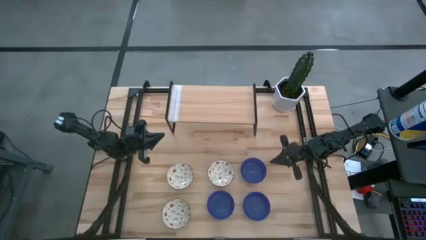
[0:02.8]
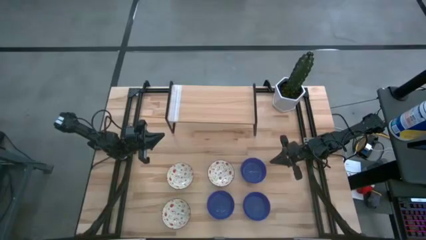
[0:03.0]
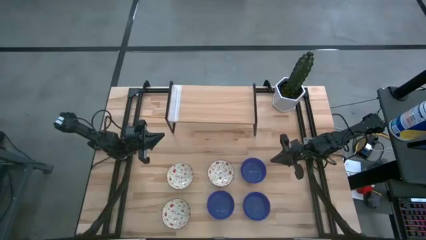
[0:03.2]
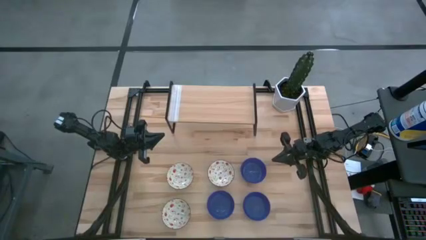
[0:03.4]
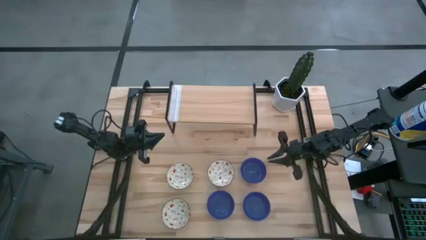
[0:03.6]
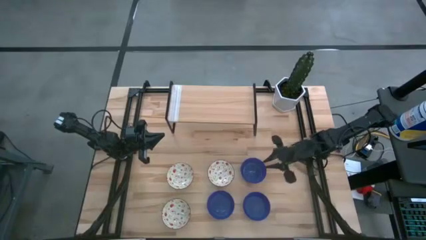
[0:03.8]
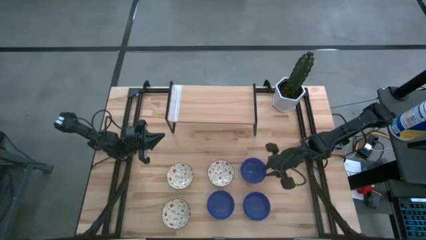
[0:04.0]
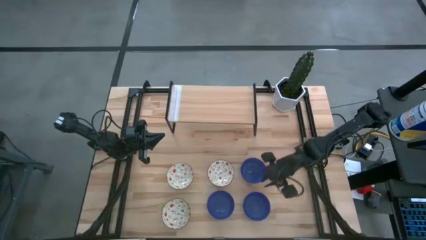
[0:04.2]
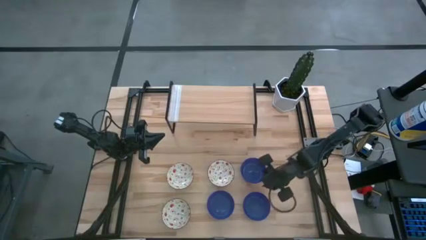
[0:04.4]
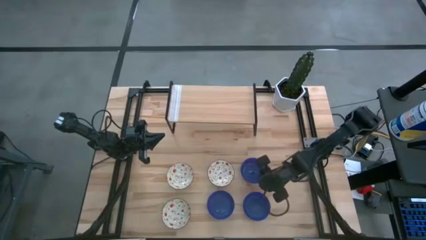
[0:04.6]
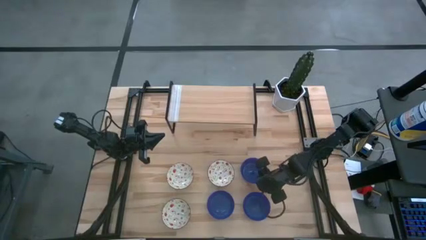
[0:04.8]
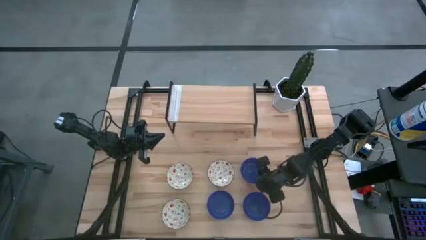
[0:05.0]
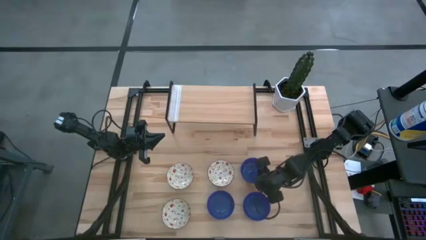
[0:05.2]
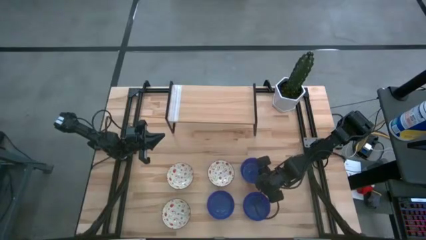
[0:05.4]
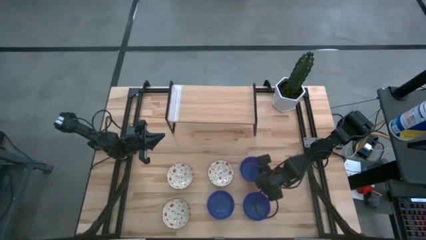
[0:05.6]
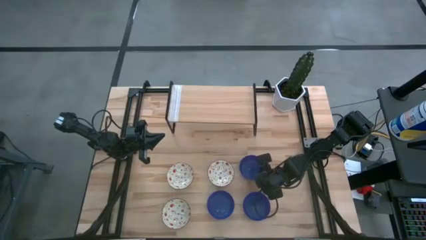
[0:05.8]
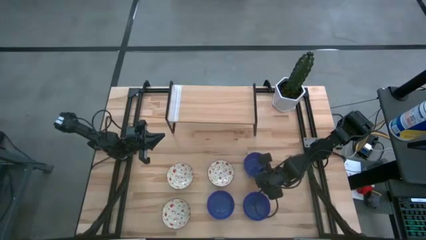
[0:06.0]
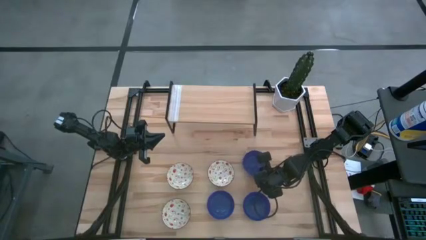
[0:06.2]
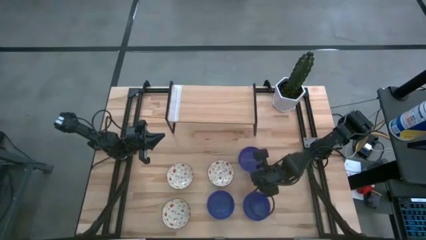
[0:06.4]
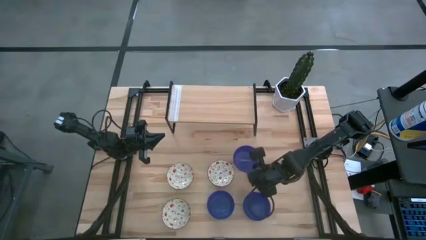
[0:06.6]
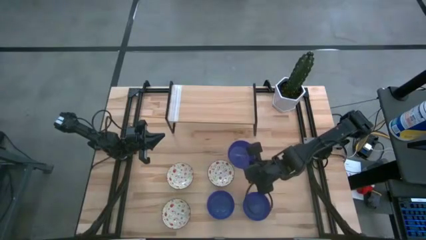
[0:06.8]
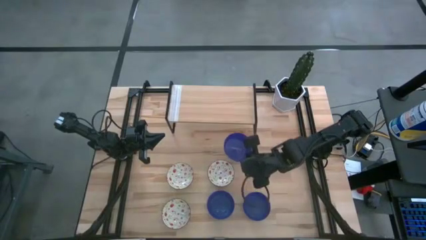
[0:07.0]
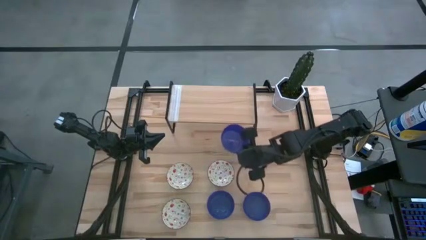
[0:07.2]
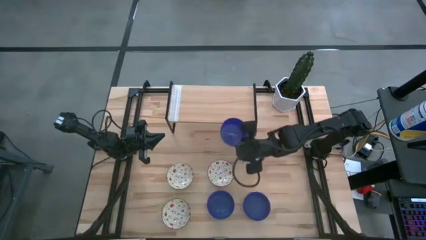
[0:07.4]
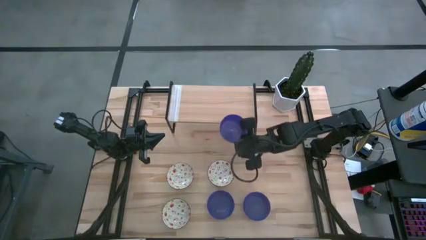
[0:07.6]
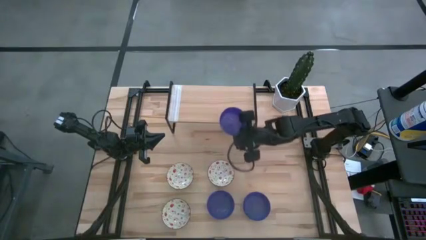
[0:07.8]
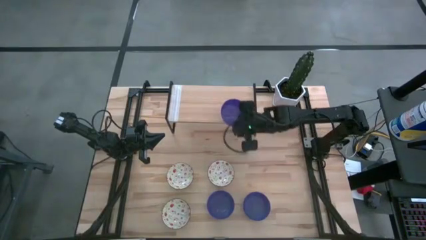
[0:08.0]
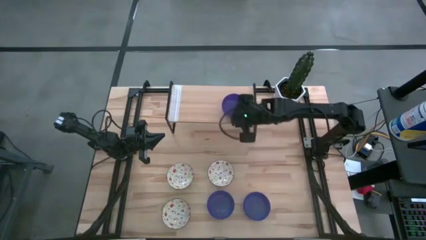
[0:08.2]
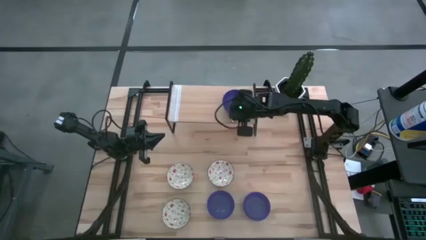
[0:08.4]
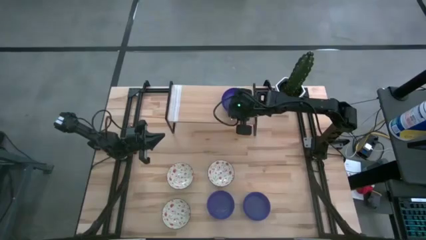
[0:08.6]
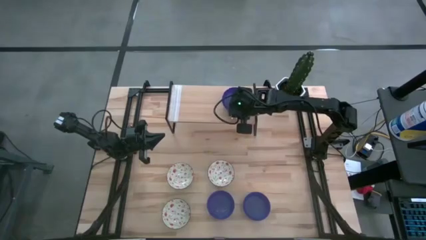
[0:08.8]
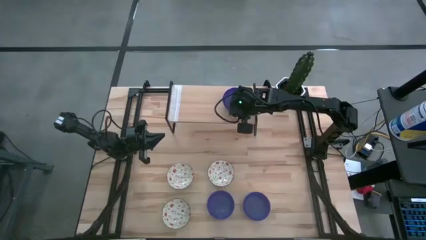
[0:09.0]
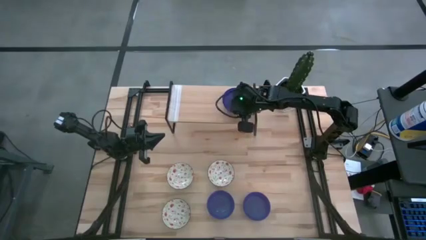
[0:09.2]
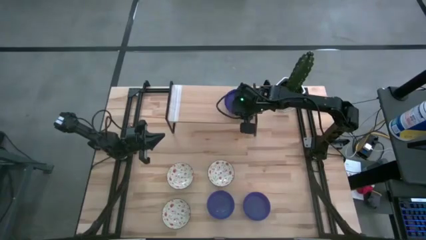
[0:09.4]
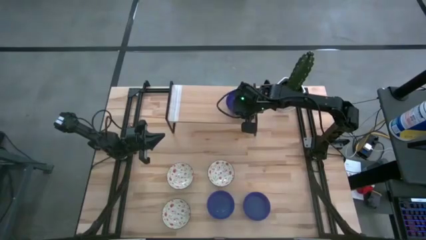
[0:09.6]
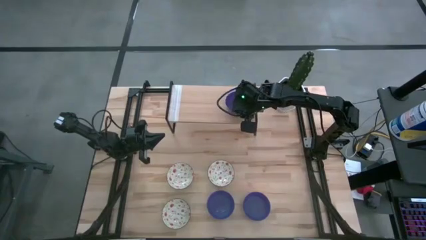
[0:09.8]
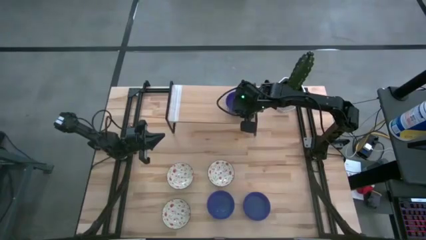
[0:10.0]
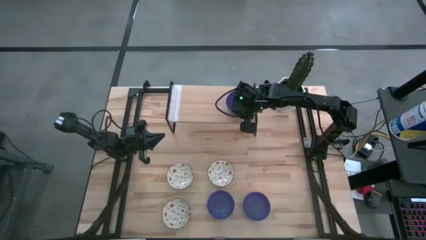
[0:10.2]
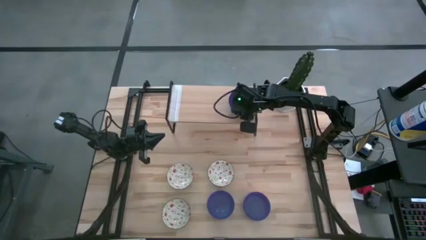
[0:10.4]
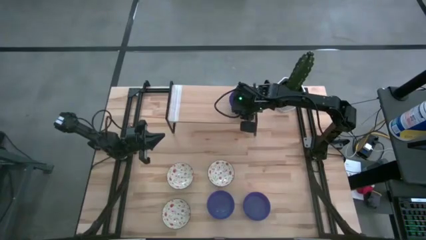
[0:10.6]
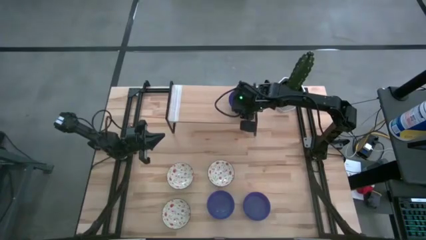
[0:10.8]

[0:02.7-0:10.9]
Task: Pick & Place Mini bowls
Put the top right blue bowl on the shelf

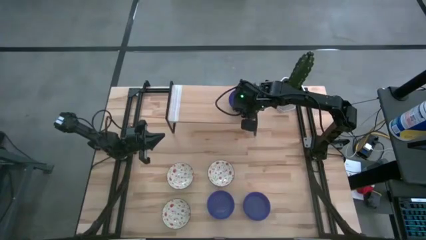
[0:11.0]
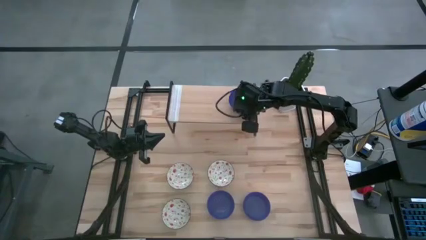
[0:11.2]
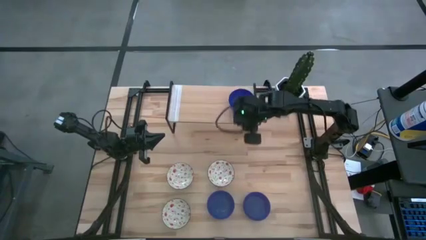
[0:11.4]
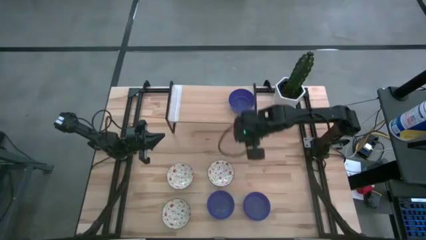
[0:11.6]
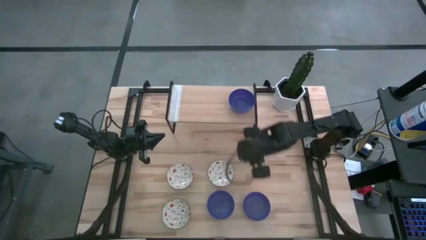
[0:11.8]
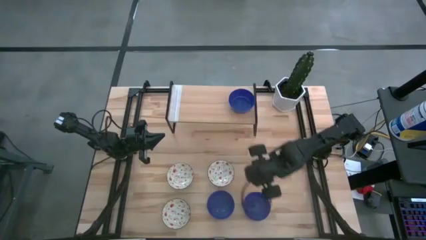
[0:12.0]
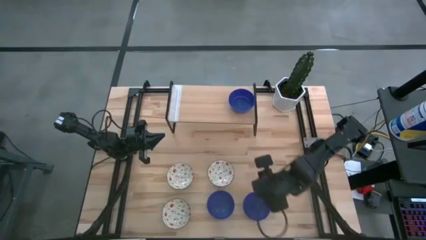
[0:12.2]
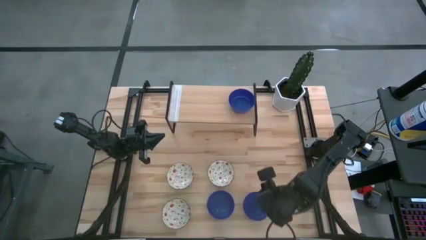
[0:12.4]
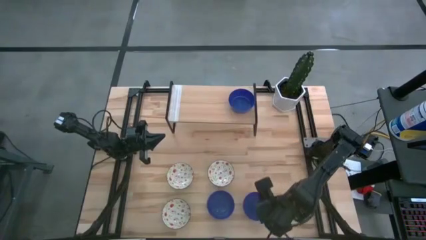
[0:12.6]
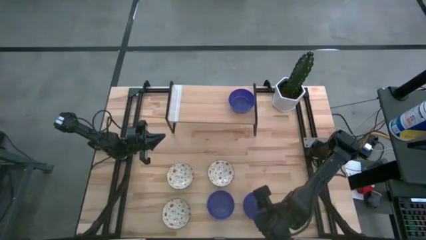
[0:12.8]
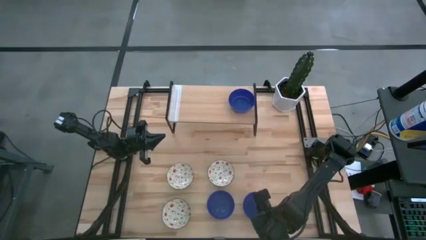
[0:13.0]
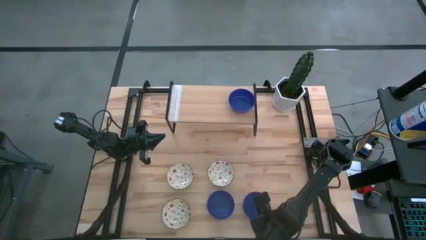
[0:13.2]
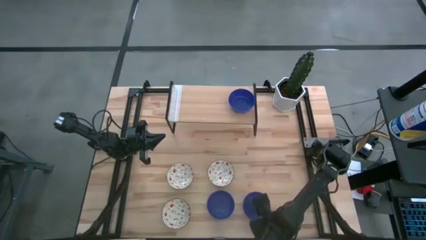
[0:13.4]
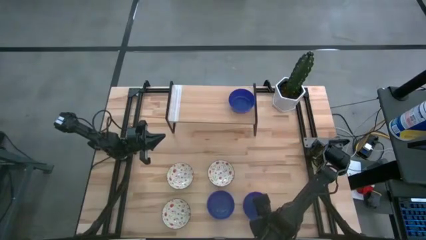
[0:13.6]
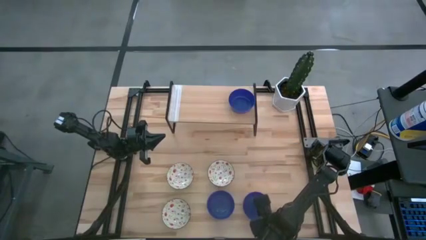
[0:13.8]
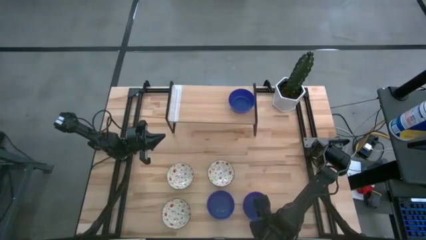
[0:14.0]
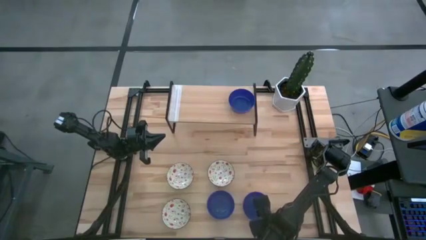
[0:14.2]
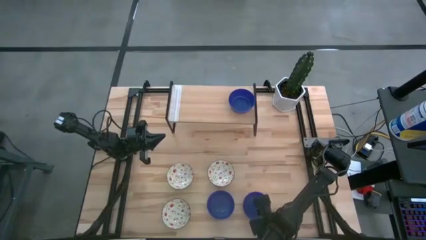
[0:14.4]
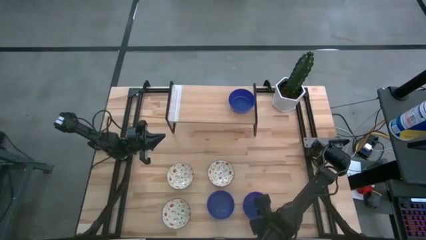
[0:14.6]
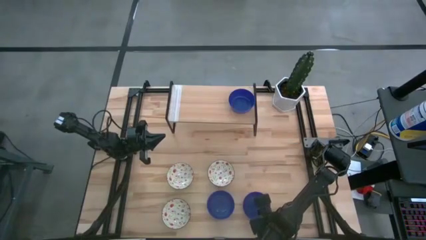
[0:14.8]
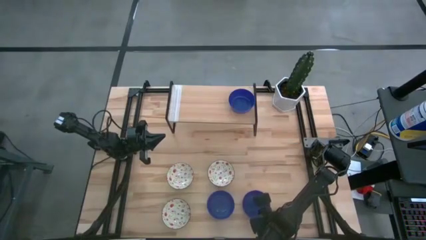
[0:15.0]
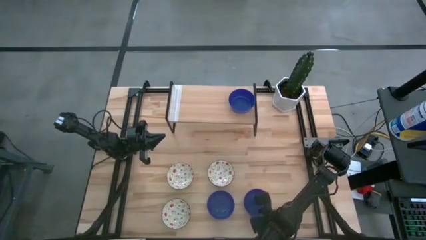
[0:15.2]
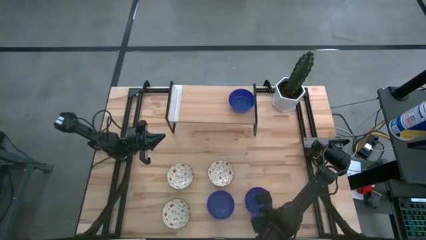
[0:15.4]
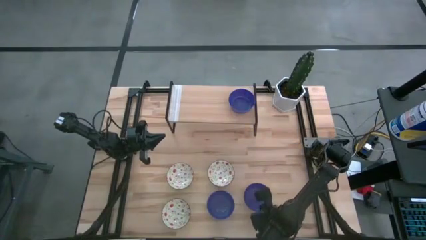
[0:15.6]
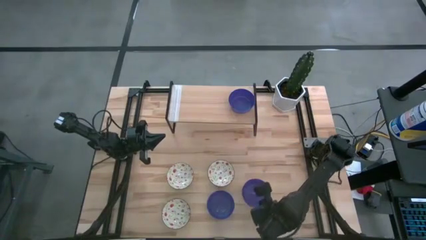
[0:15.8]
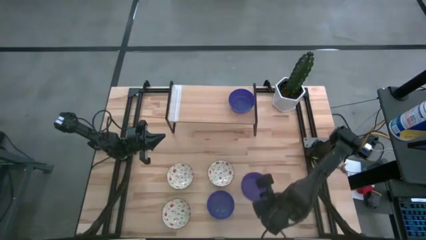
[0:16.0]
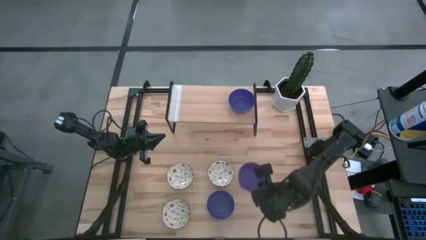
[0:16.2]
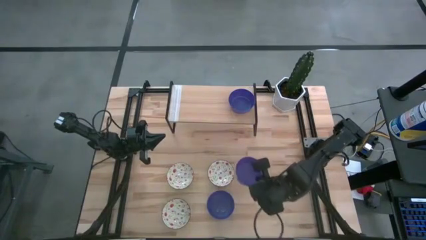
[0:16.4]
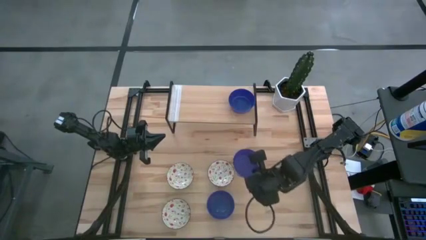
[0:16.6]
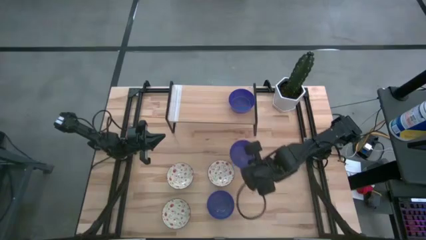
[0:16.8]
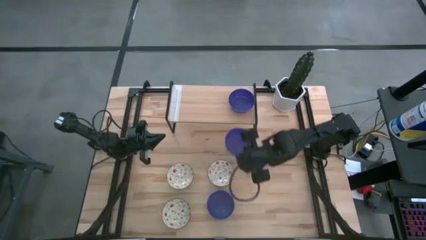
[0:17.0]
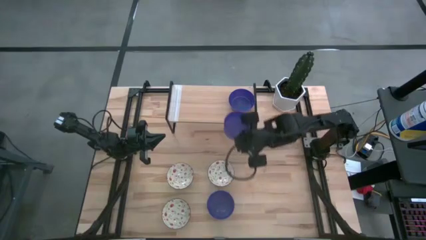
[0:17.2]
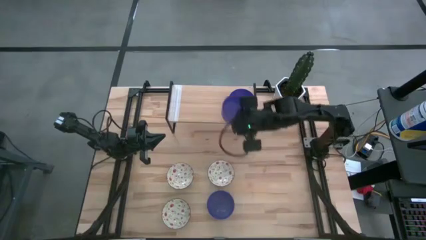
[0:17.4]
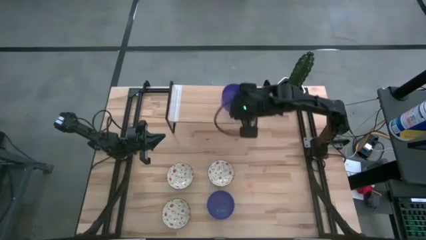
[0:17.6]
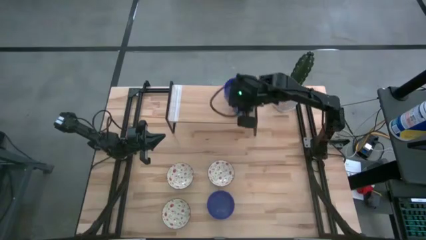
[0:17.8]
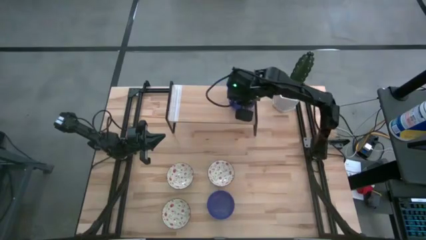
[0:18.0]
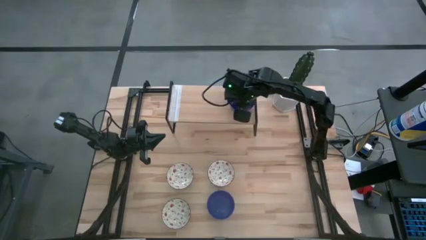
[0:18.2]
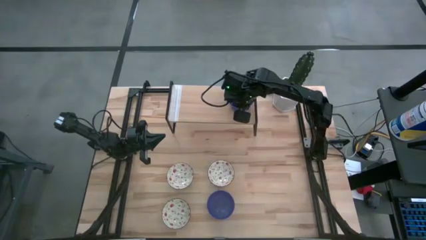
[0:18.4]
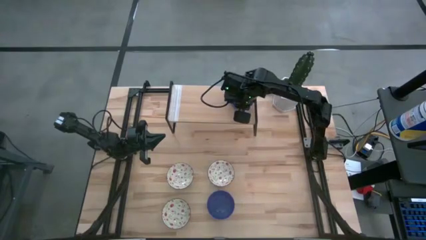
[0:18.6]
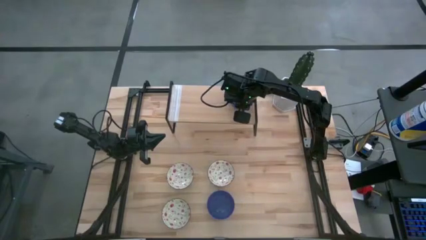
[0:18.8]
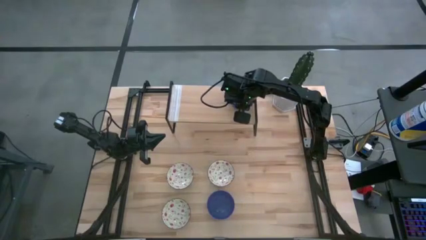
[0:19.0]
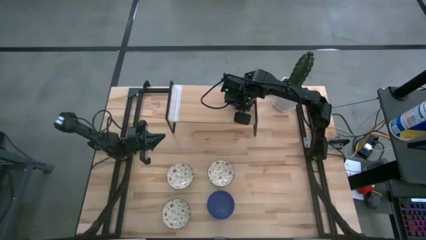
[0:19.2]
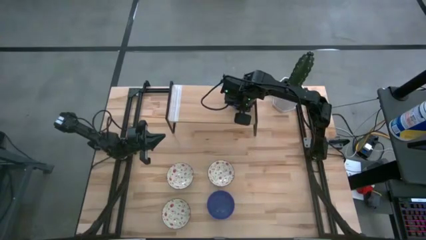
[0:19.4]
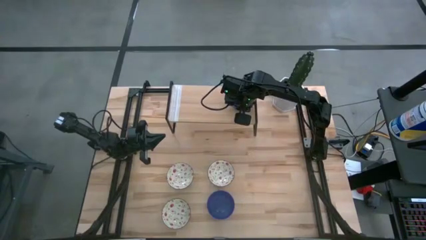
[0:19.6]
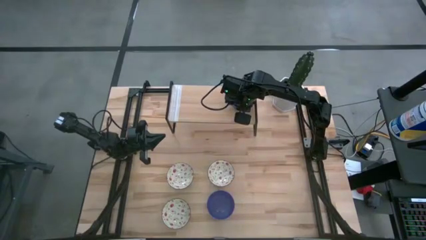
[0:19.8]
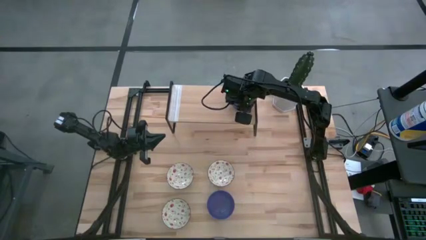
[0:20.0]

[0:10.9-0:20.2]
Stack the right blue bowl on top of the other blue bowl on the shelf
